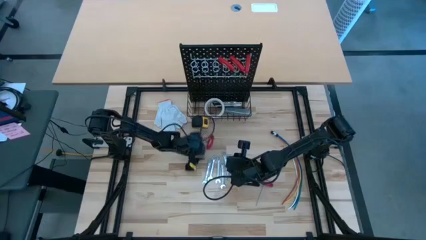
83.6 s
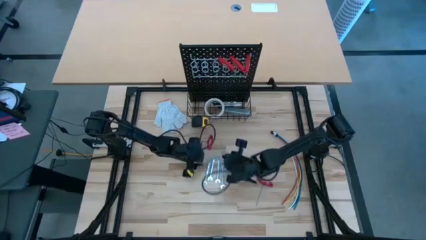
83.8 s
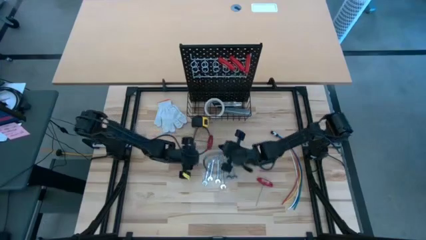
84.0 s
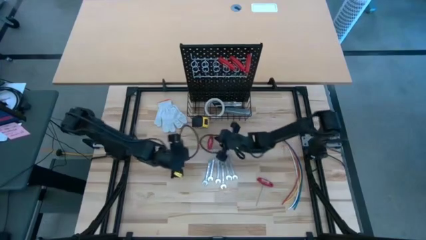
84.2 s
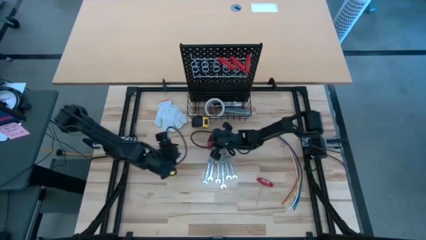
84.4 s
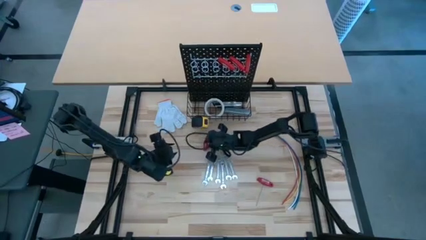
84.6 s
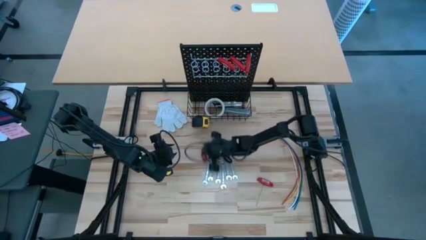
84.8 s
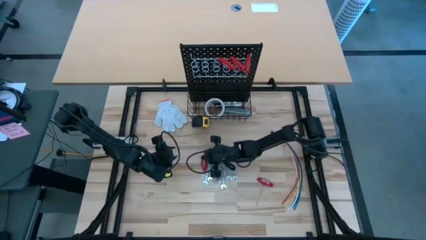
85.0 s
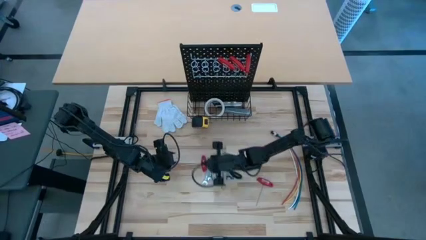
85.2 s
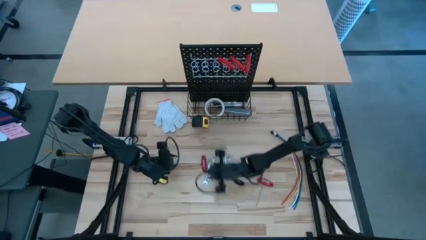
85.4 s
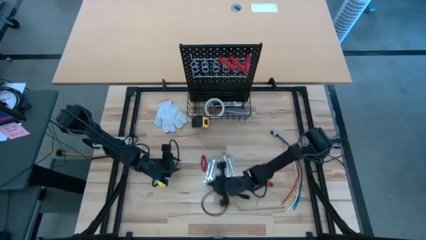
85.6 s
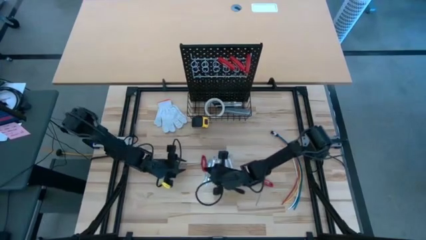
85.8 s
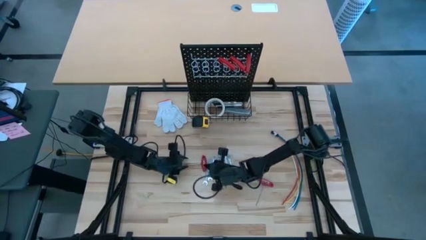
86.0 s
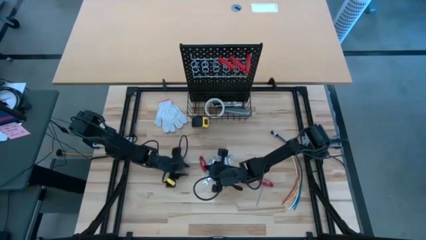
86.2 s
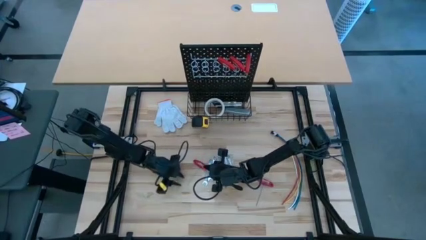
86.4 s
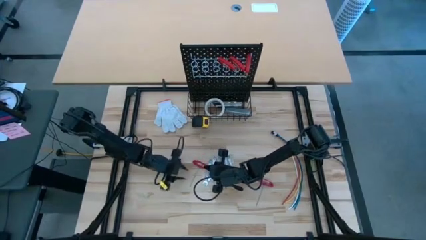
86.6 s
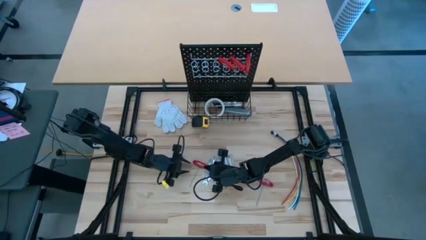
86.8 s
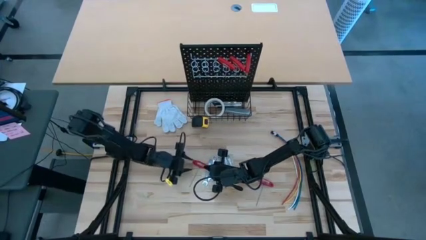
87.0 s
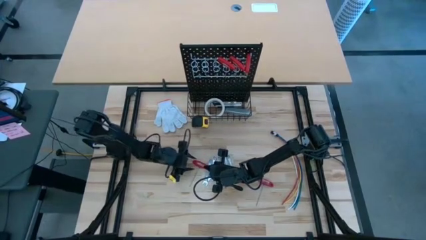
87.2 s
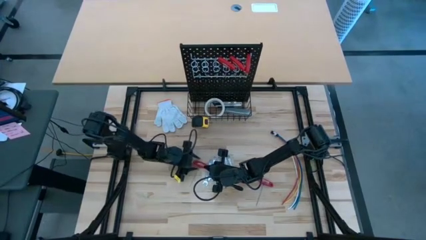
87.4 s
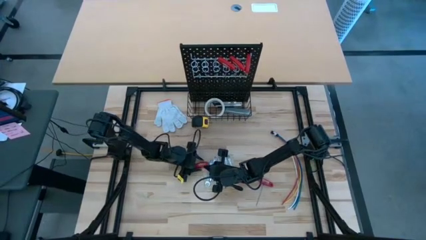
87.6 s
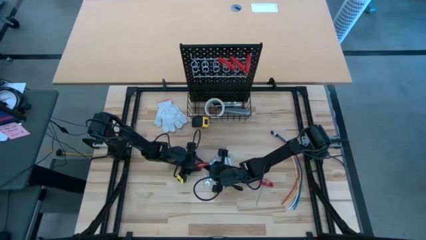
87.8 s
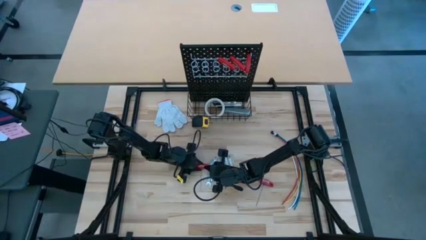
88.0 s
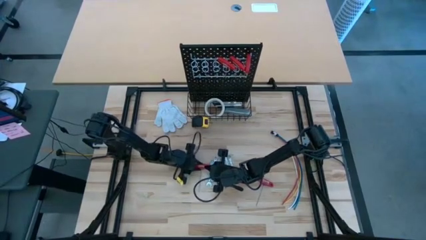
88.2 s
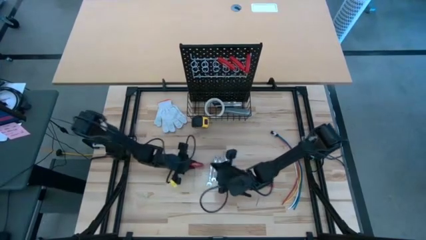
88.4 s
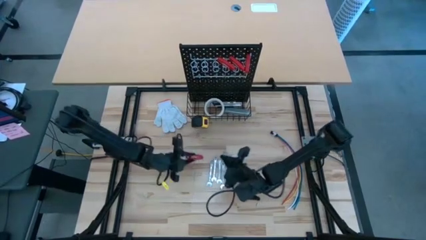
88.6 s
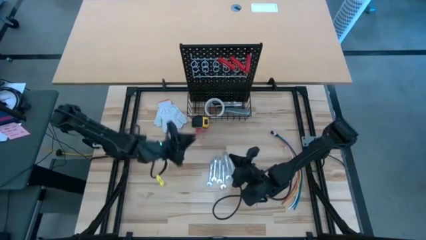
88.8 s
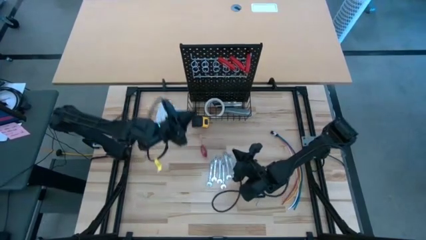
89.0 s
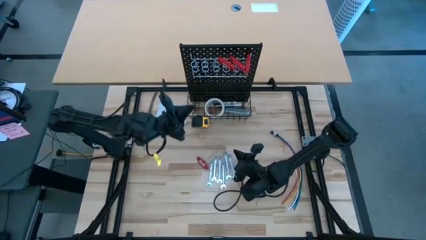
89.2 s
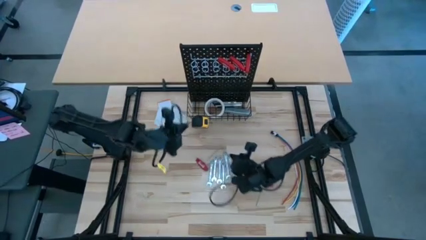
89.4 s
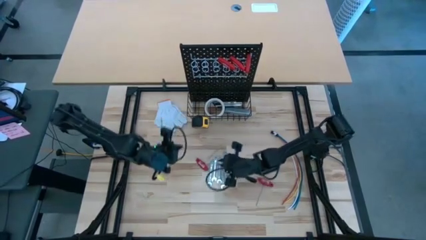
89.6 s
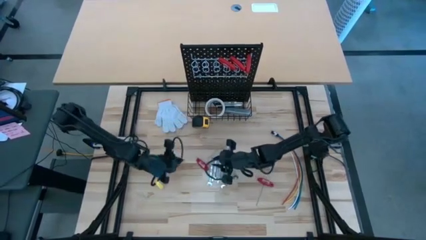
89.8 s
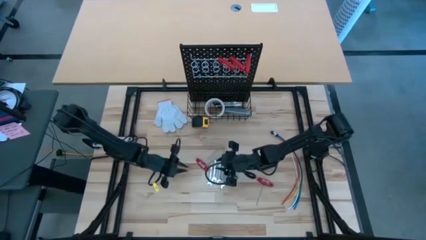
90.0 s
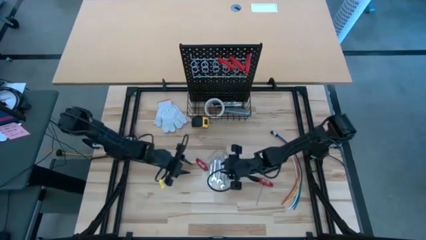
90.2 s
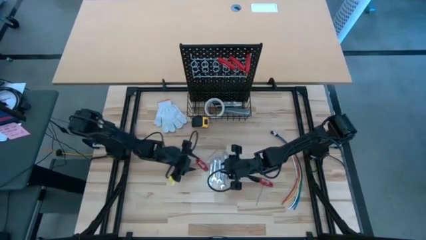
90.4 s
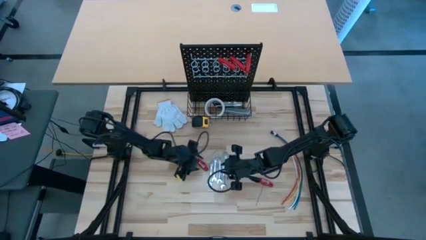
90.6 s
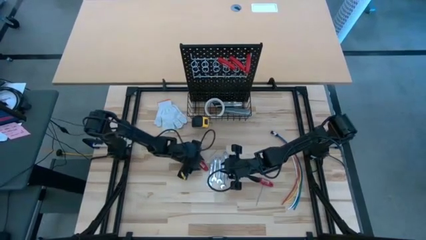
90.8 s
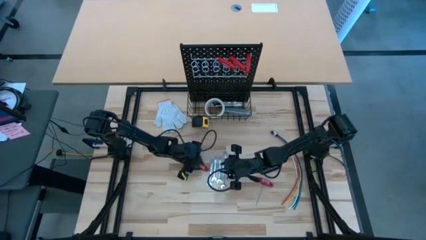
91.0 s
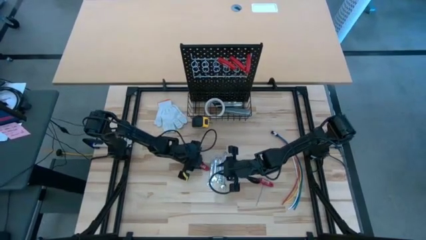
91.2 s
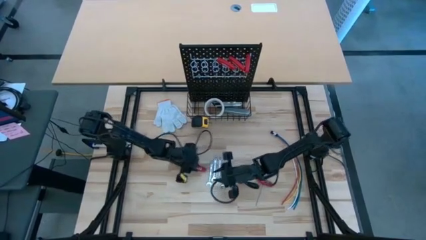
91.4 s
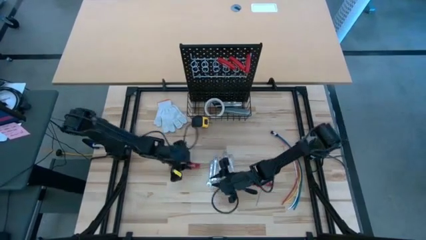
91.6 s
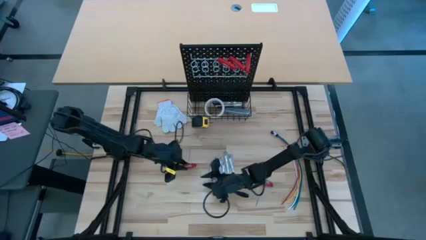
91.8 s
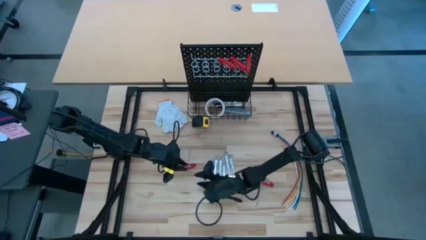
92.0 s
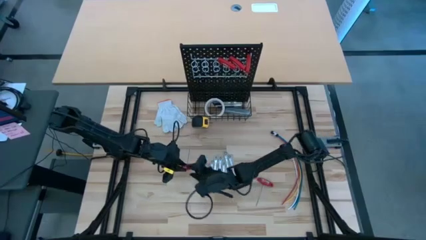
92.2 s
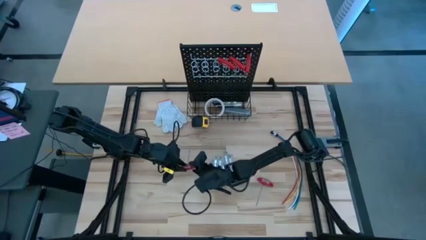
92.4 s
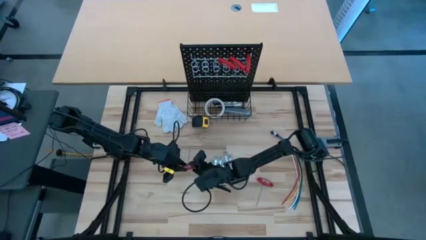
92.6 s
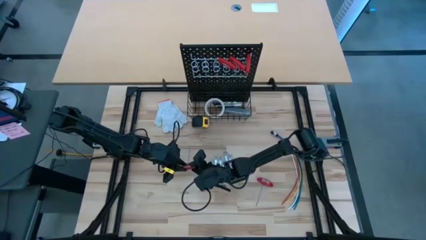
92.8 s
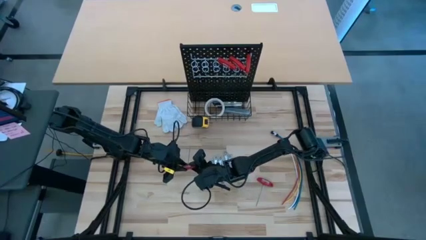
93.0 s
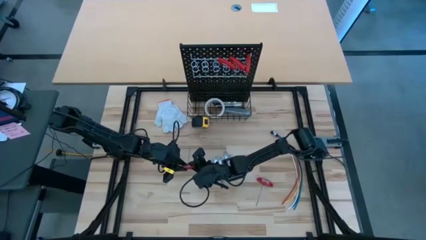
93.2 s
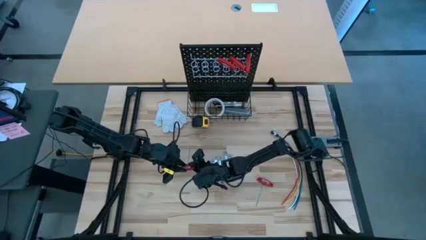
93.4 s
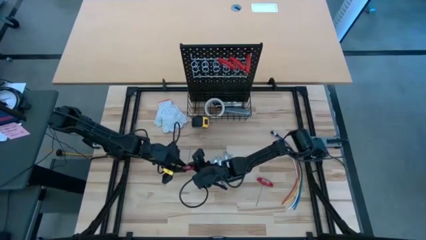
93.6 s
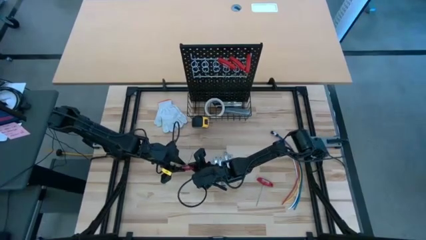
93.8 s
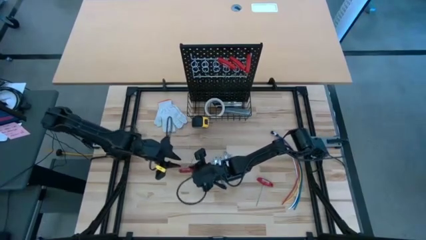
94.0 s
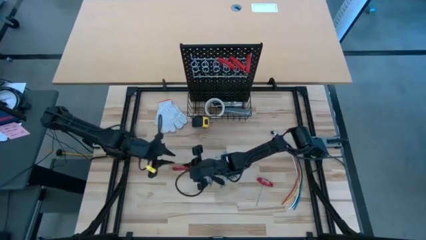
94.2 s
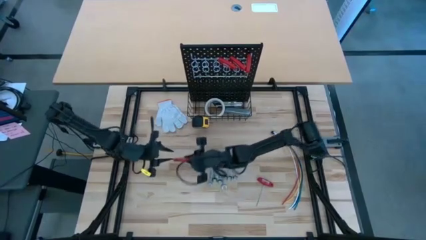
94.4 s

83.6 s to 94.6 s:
Task: Hang tools onto peg board
Hang the red Allen wrench on the pegboard

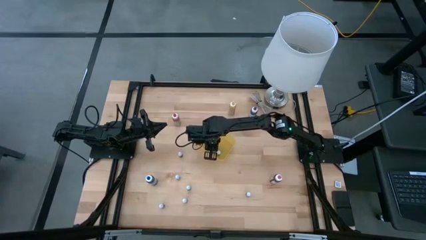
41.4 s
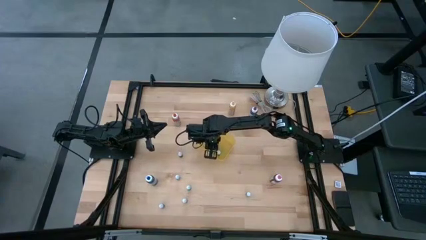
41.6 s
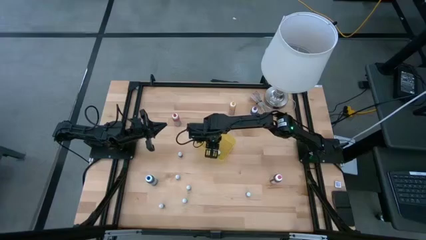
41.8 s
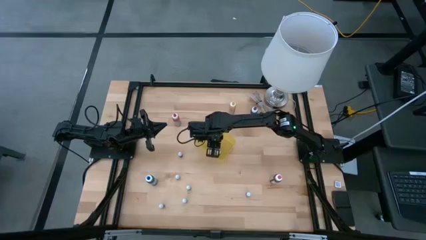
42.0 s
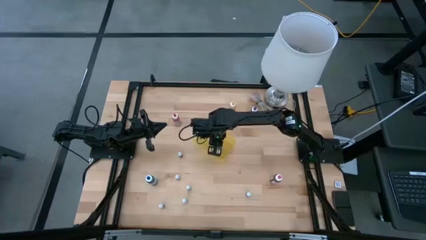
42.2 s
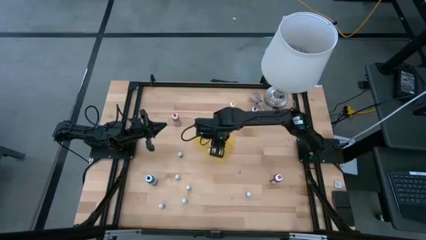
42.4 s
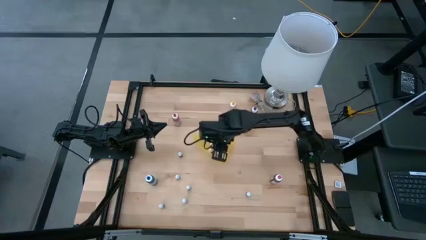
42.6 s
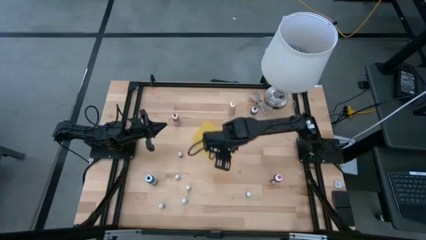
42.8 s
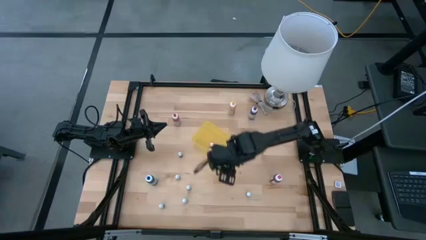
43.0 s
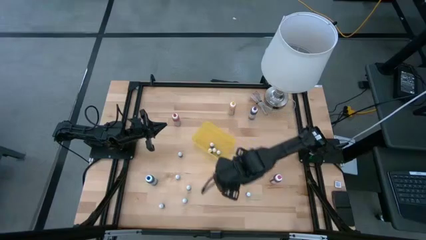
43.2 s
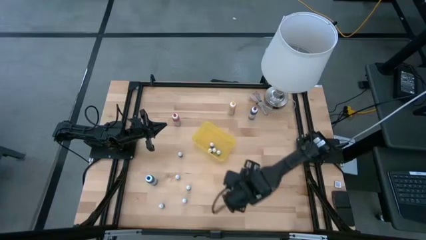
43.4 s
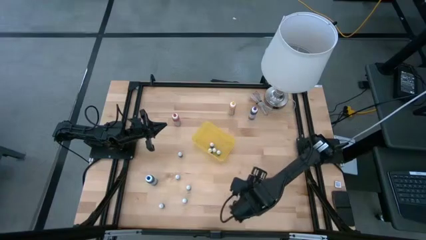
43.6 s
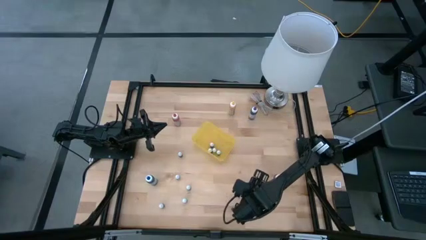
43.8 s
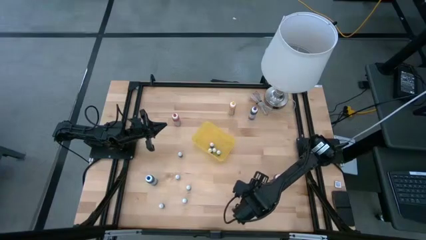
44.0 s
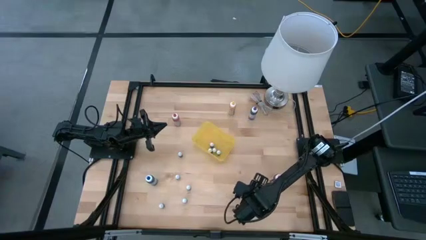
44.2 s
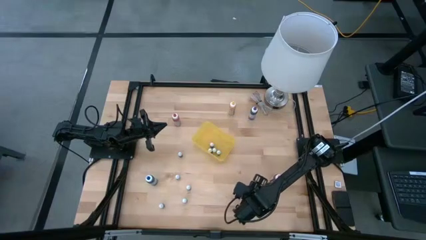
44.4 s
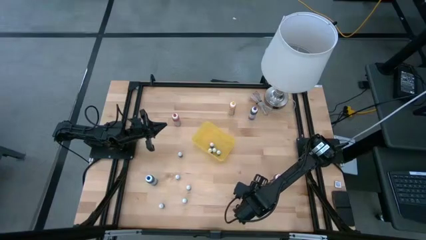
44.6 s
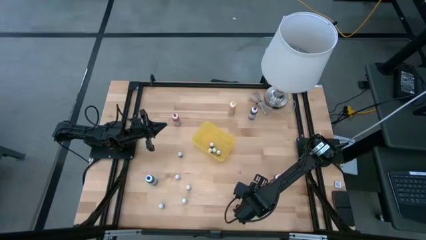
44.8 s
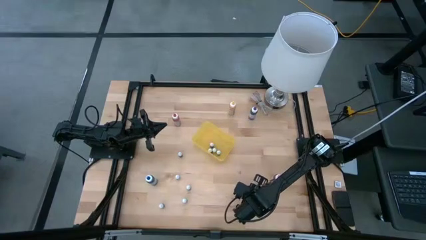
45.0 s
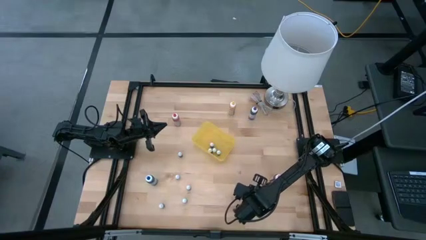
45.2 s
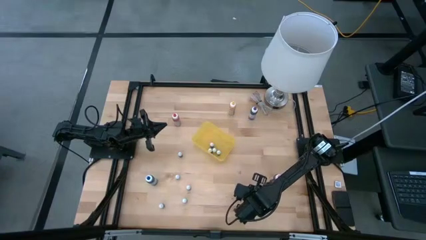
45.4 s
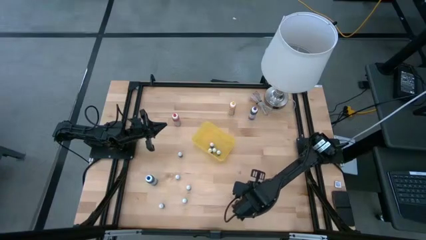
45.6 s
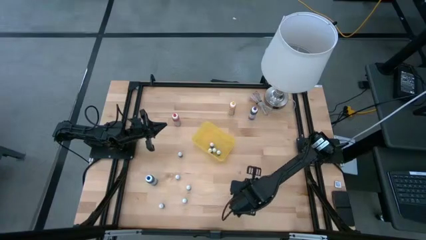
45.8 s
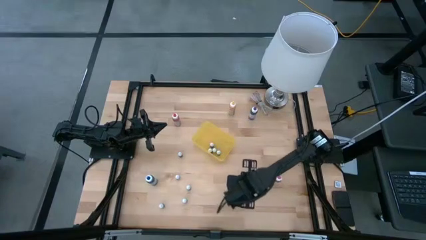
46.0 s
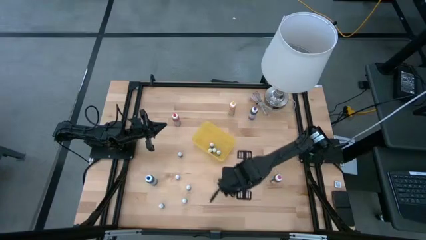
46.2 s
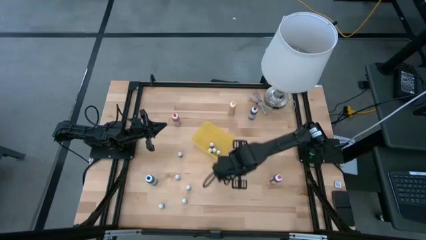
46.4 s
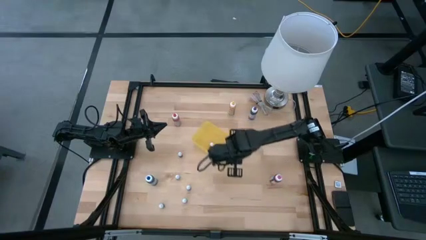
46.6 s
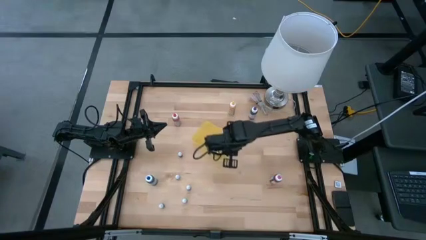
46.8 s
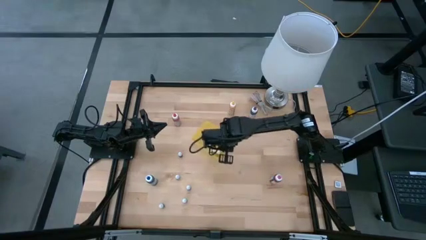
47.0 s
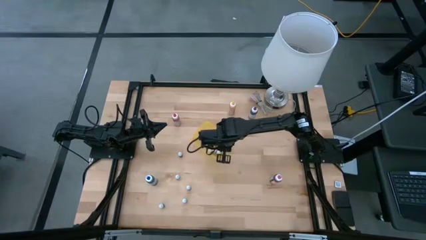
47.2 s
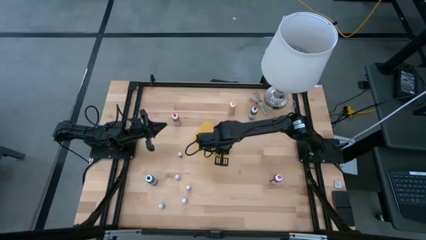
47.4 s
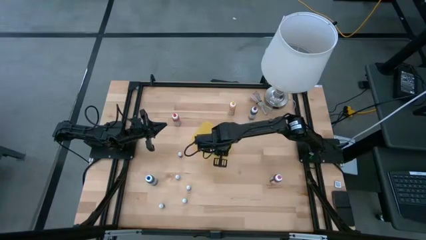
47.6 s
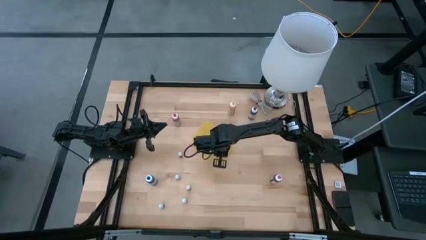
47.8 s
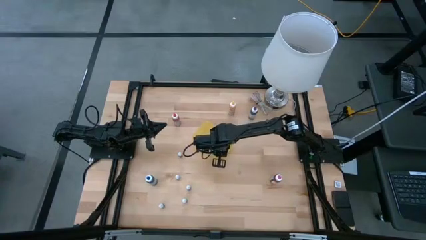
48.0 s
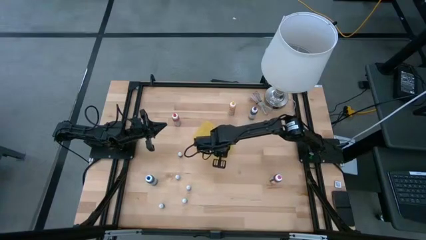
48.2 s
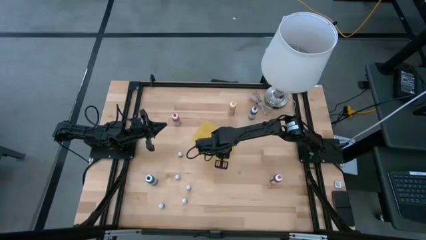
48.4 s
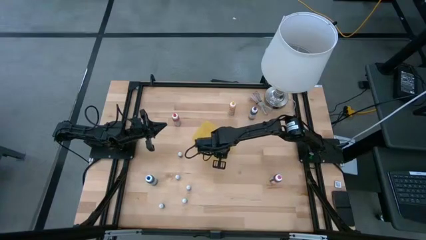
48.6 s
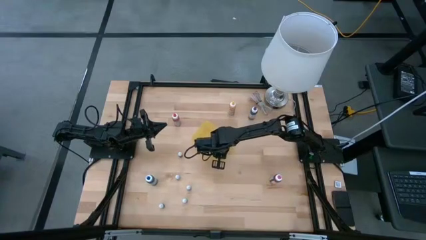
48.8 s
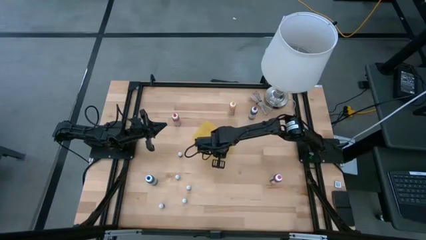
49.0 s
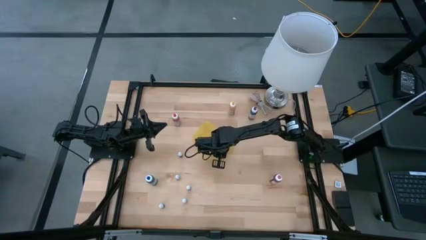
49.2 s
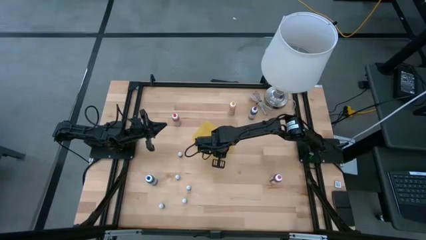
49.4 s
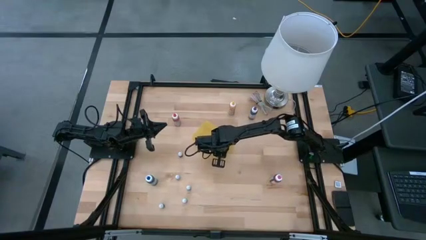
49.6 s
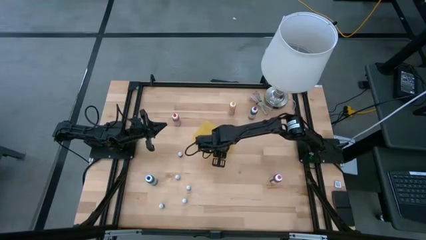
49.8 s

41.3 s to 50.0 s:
Task: Pick & Place food coloring
Put the small brown food coloring bottle into the yellow bin
